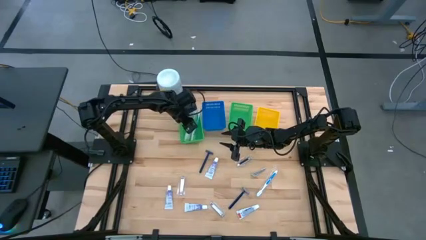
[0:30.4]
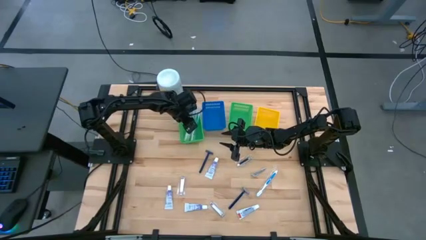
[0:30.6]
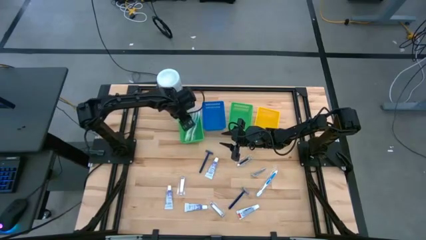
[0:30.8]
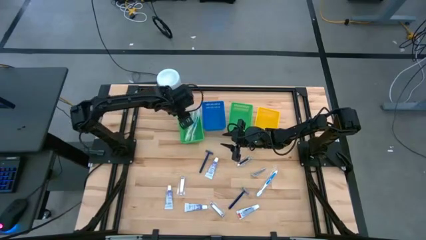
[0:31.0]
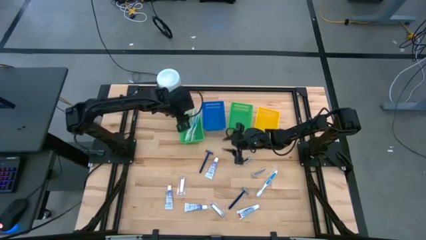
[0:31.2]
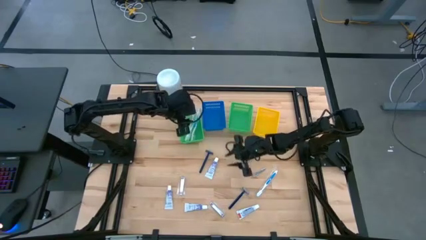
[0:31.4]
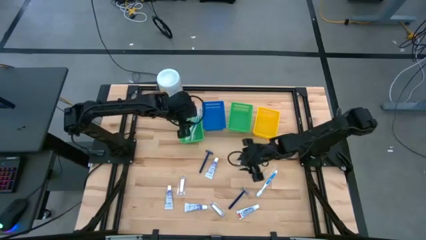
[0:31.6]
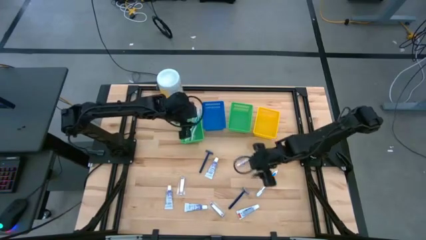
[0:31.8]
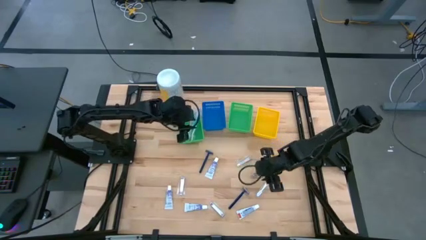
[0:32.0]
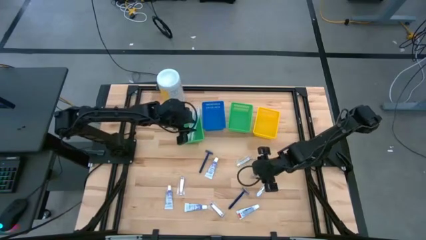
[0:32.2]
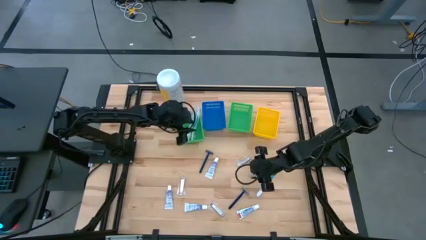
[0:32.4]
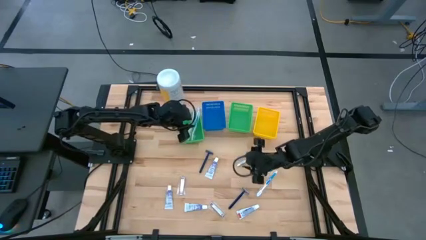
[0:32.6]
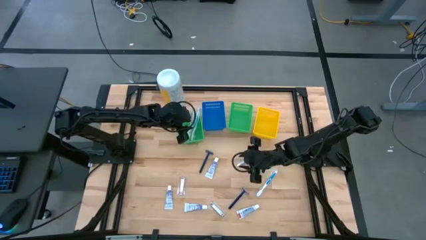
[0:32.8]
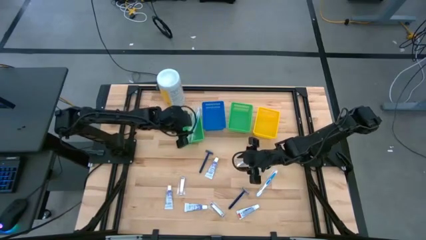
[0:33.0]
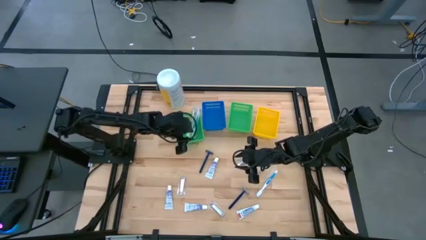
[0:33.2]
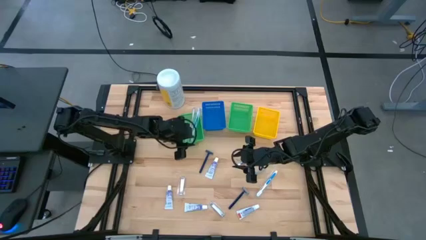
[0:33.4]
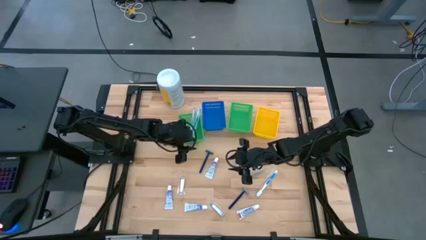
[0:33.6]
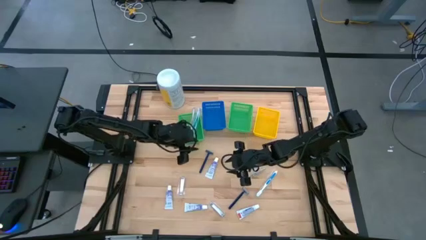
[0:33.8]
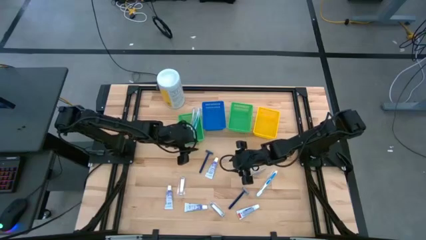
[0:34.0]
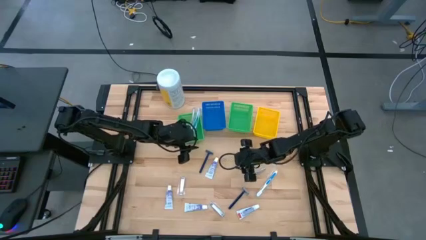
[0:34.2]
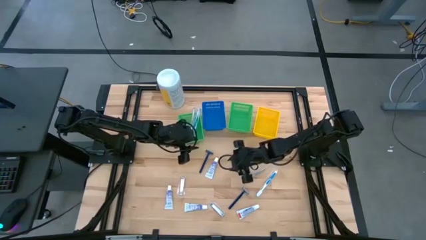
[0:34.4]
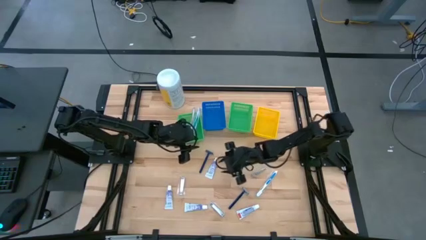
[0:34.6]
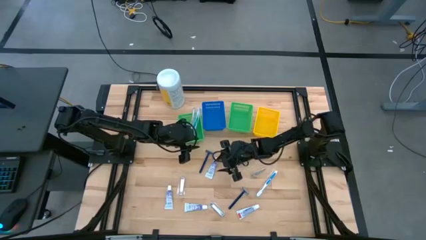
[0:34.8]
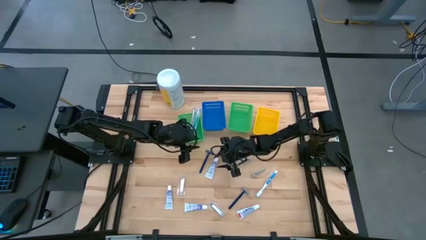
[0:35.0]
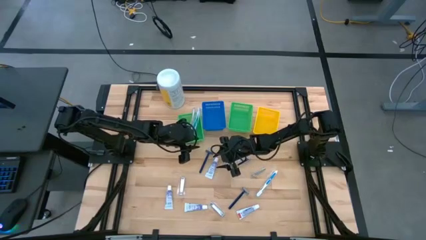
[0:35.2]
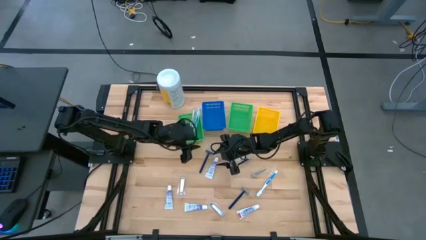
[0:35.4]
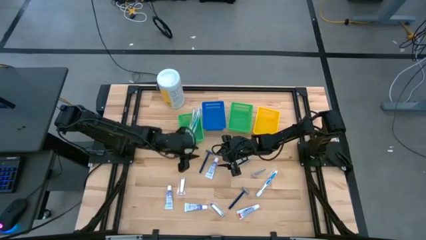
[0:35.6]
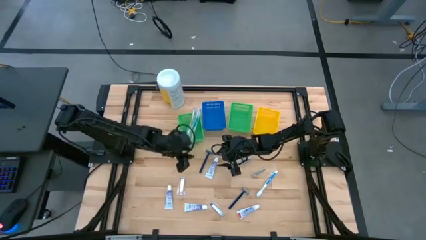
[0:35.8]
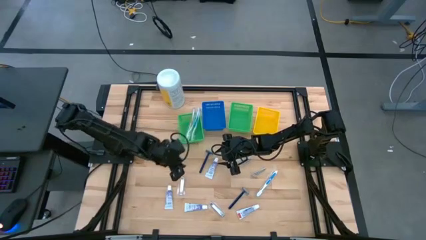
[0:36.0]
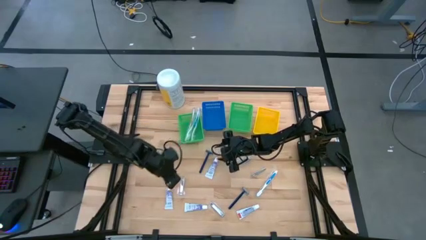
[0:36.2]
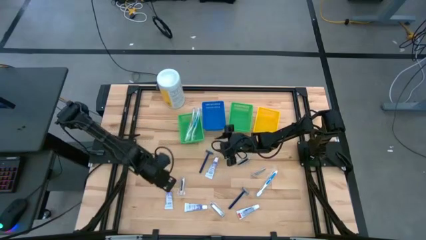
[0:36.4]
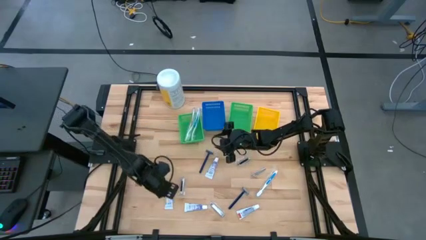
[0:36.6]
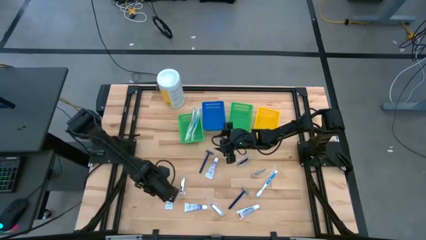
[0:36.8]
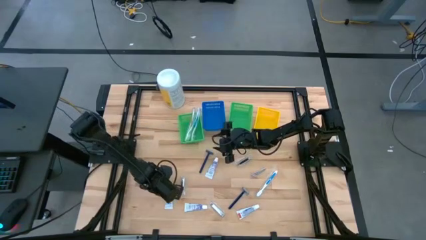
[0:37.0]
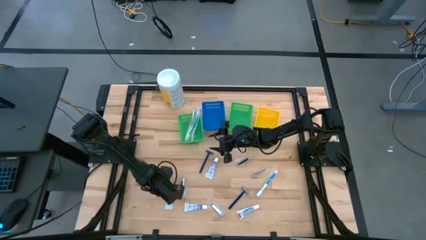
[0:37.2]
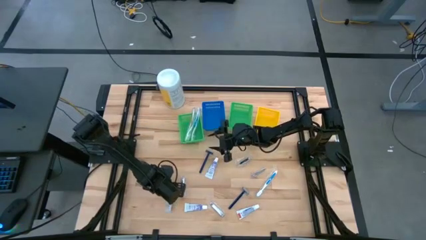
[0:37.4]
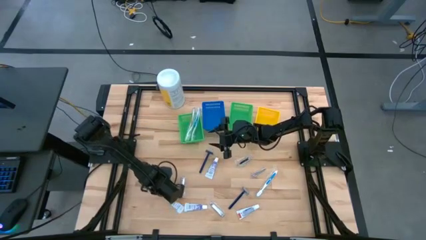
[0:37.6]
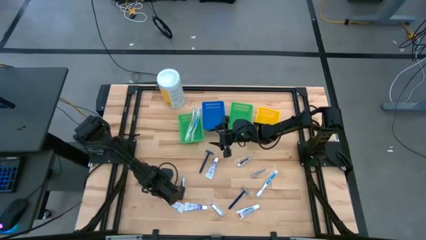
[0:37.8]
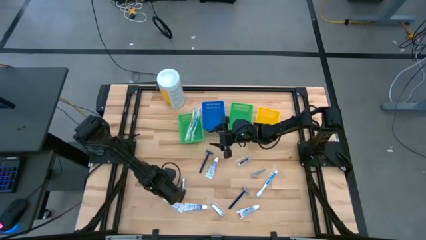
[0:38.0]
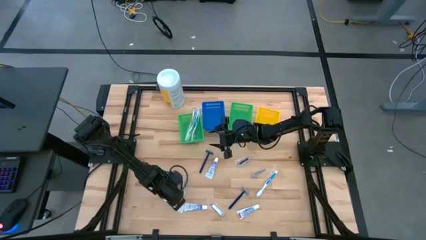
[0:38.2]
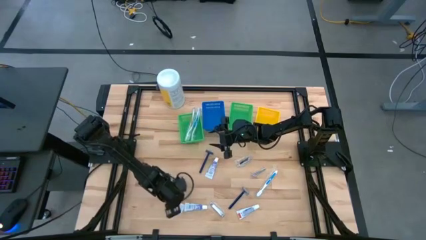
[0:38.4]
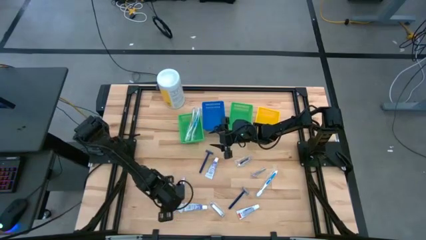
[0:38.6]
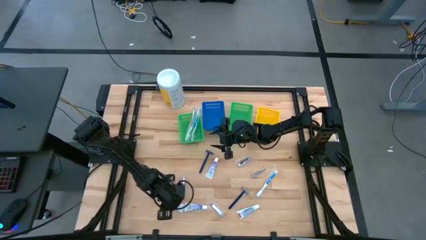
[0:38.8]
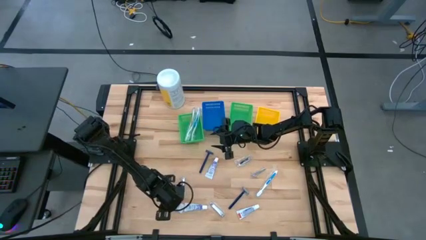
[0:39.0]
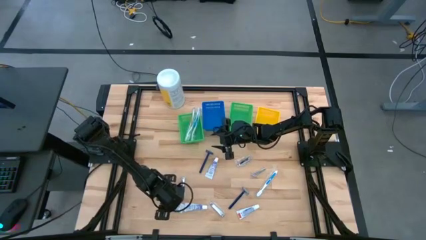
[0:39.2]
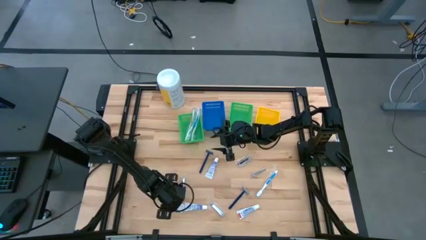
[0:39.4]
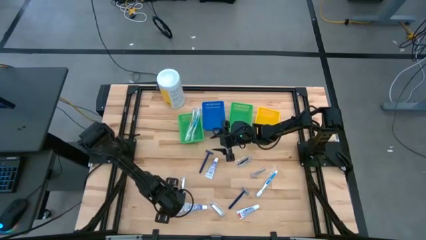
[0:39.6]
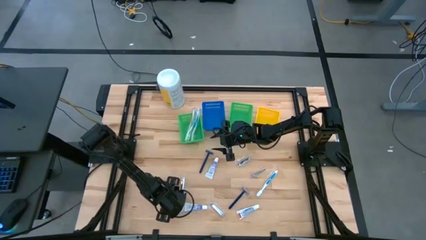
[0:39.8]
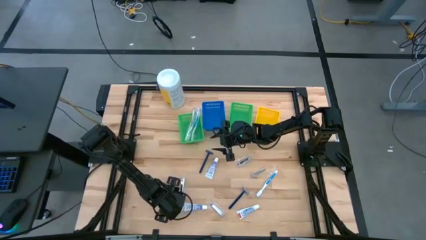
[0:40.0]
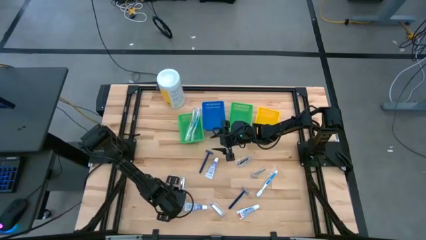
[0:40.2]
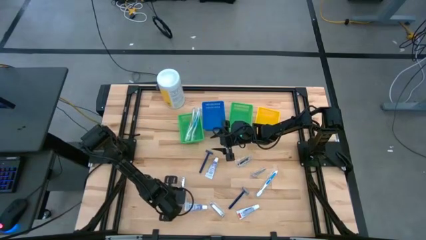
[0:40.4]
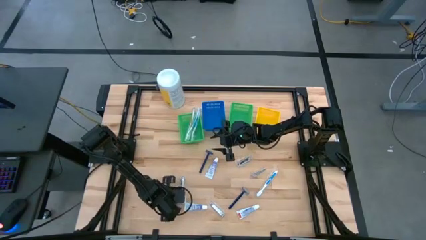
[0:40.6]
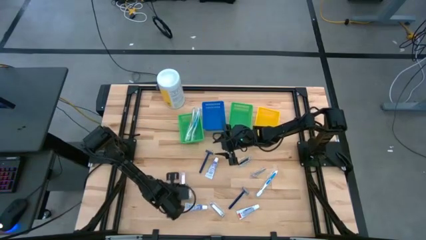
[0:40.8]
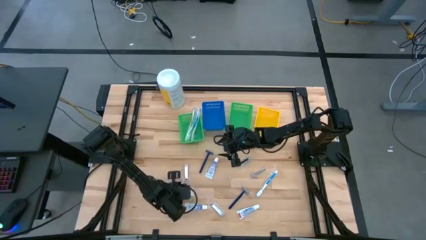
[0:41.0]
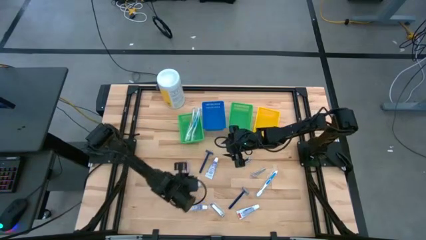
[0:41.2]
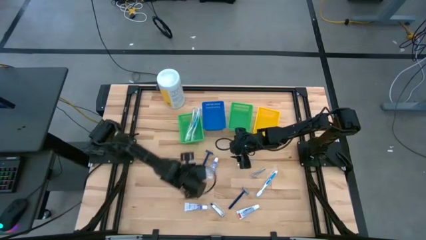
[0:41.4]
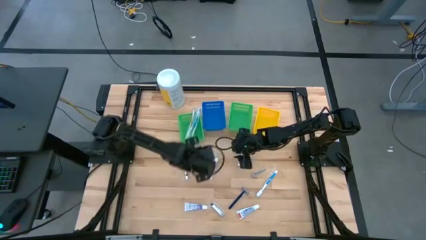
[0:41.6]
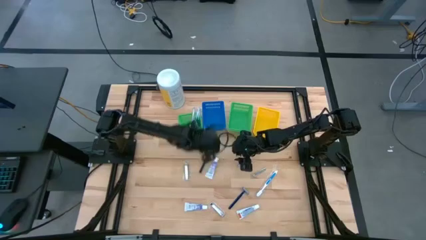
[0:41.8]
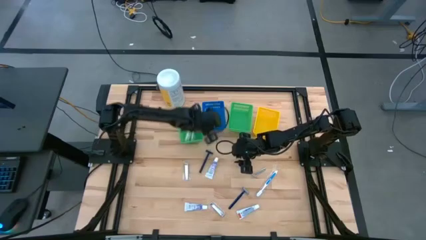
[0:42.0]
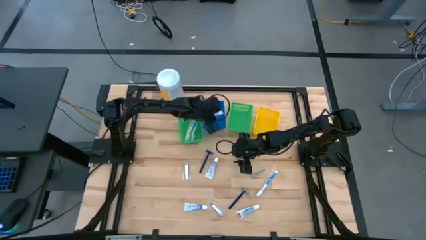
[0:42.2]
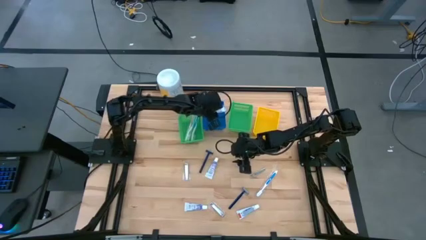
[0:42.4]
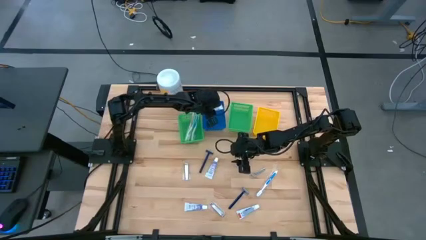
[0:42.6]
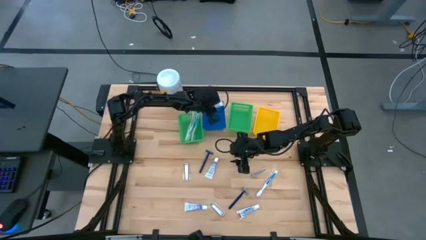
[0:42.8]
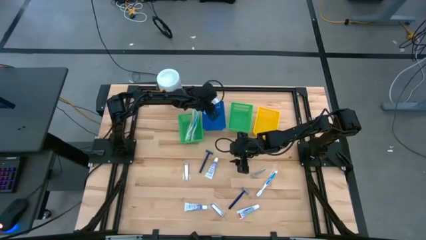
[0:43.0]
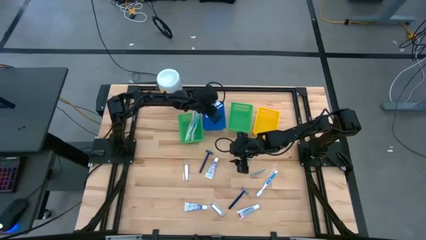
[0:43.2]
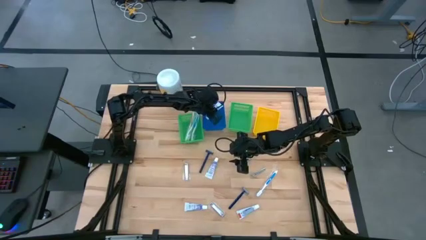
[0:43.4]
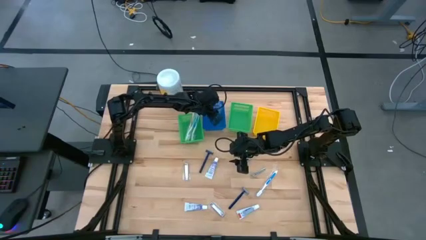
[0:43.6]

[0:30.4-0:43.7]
Task: Pick & Place Travel size toiletries
Put the white toothpaste into the blue basket

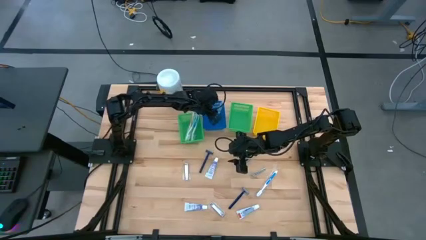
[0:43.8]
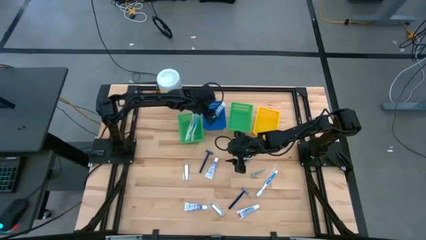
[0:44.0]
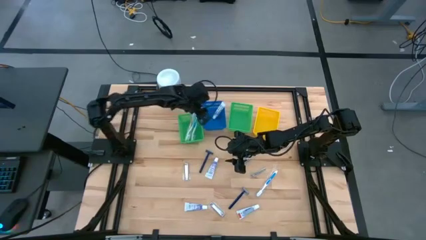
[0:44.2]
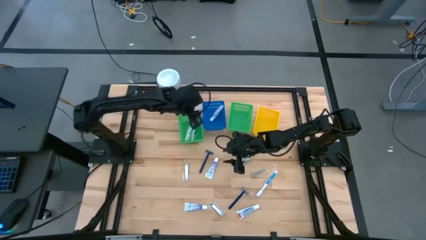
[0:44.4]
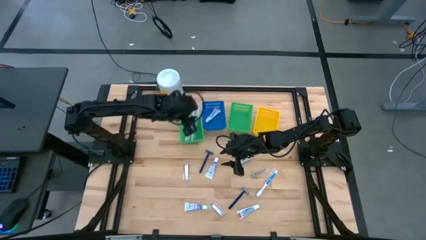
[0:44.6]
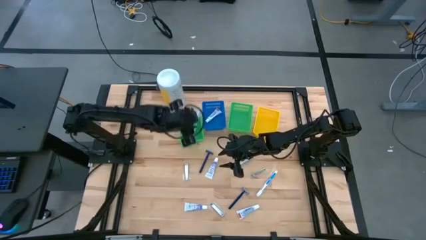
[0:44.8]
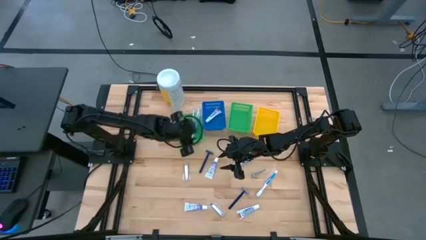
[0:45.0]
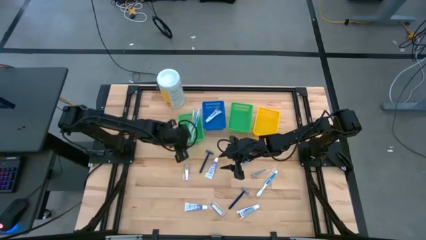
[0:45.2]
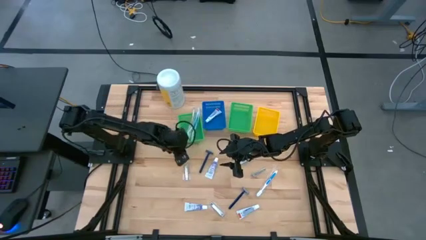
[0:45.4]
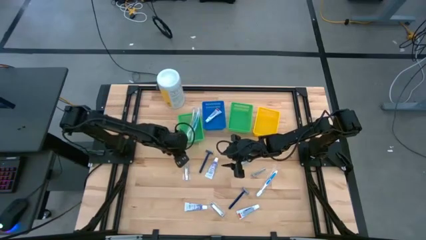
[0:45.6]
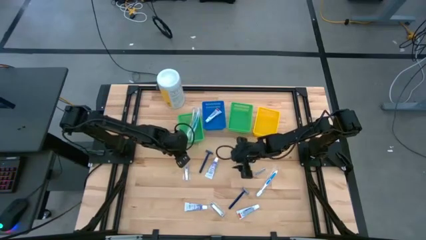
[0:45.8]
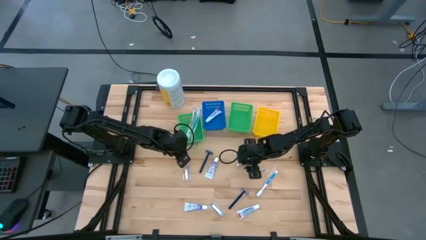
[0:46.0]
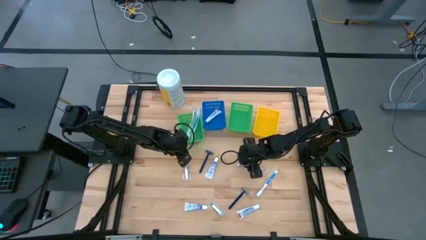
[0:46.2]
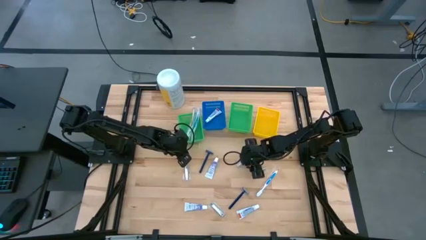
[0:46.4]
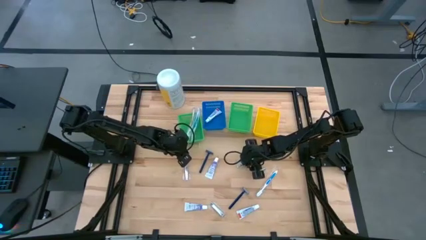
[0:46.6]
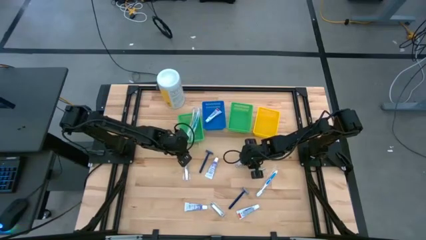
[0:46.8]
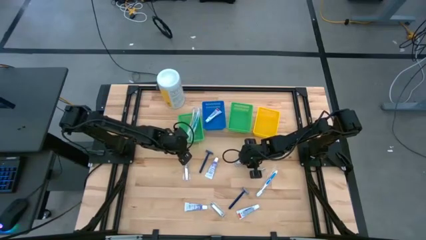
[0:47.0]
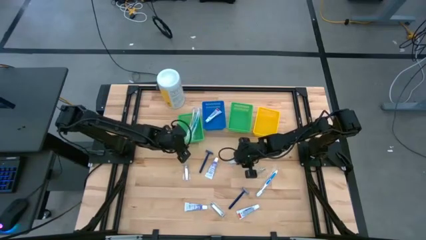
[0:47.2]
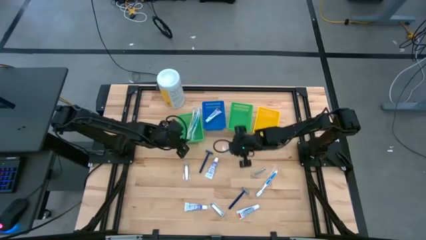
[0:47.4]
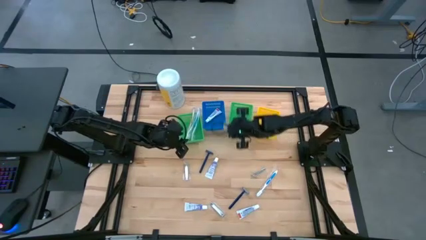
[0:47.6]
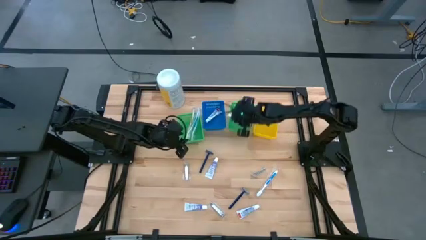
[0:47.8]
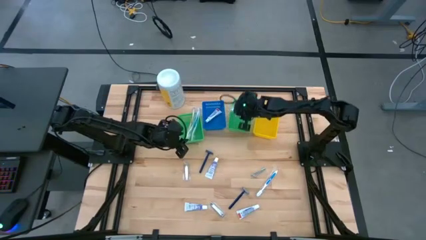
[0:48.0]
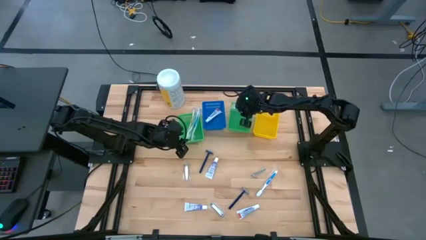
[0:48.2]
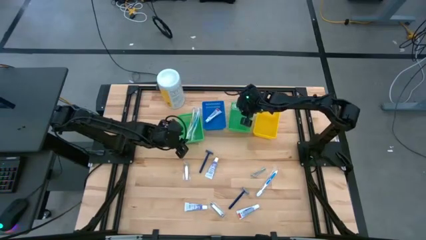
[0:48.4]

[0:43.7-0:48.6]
Put the silver nail cutter into the right green basket
